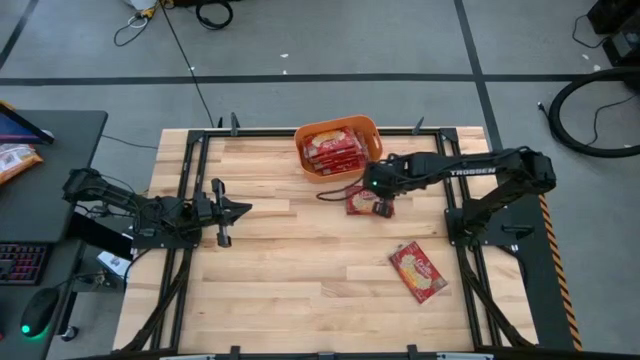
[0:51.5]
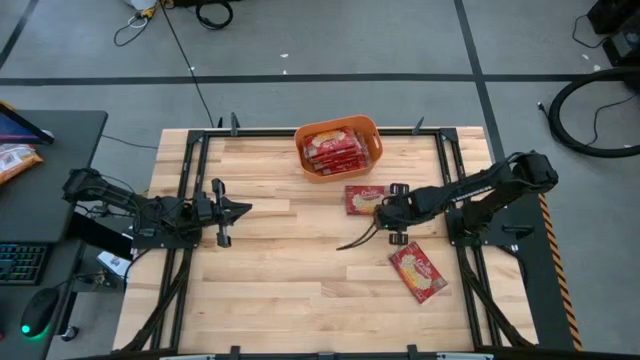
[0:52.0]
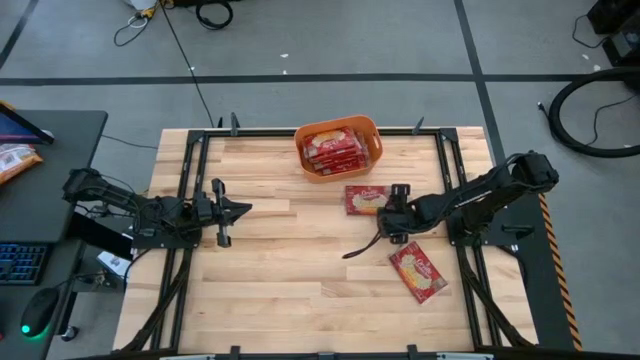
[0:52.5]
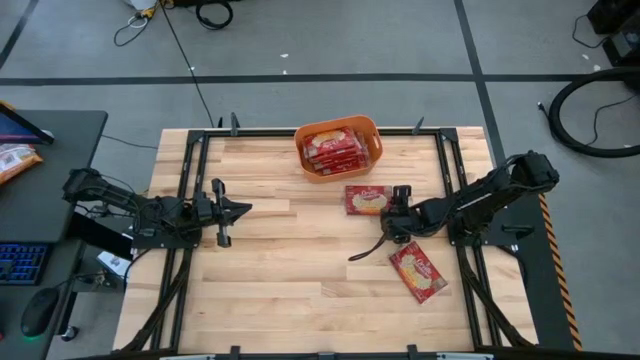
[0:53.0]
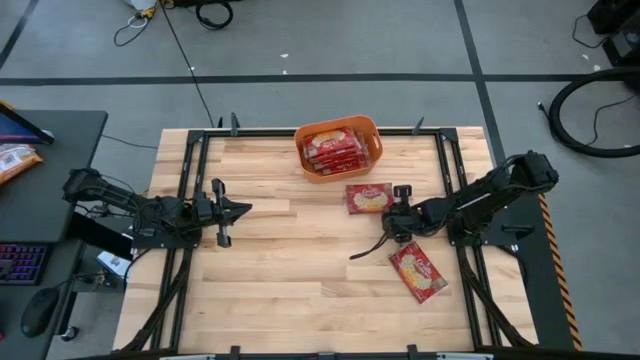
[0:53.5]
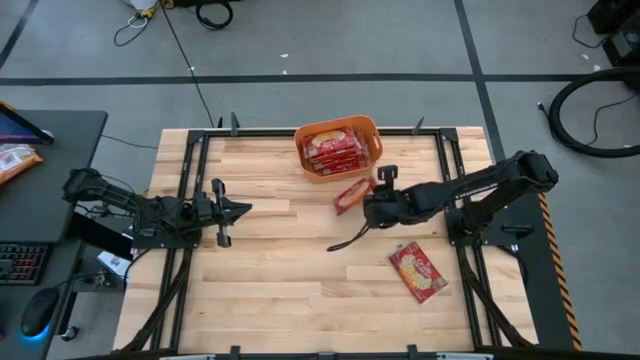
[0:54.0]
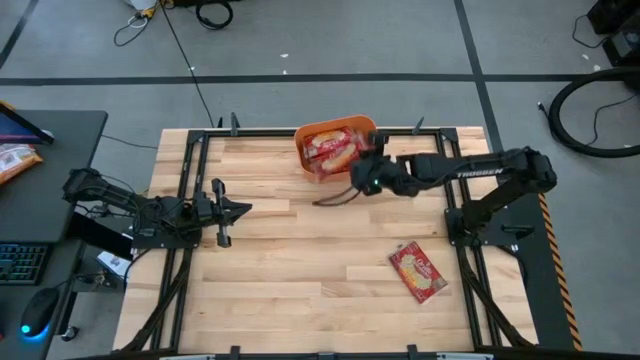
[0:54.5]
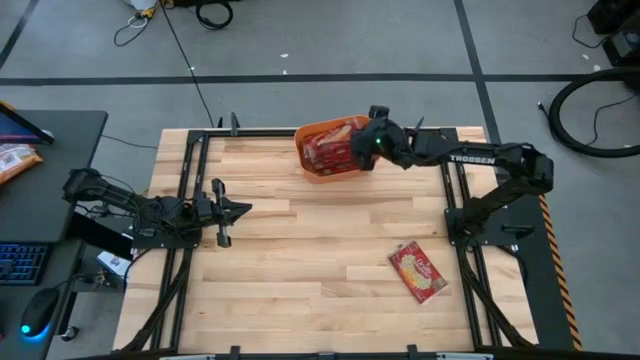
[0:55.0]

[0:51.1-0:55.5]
Task: Sort popcorn bags into baskets
Stack the popcorn bag on top of the stacked popcorn bag into the bin

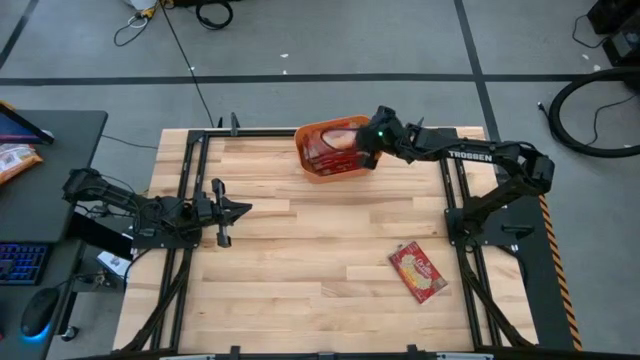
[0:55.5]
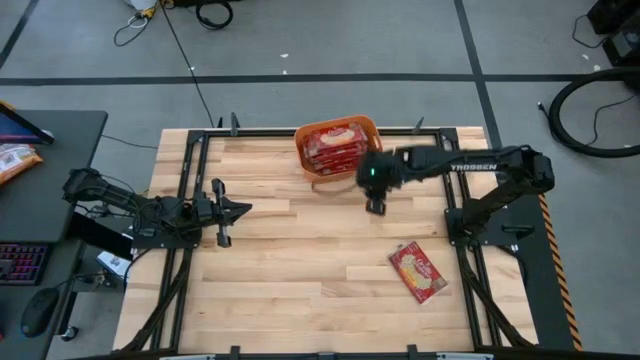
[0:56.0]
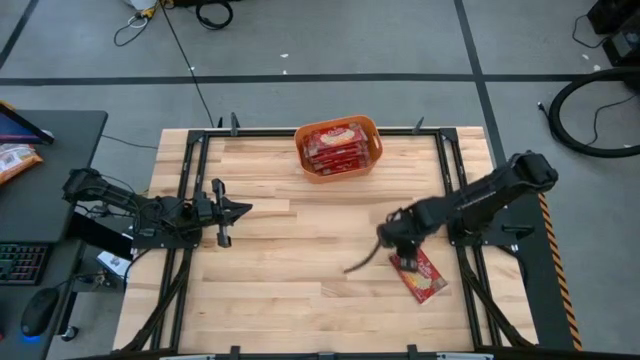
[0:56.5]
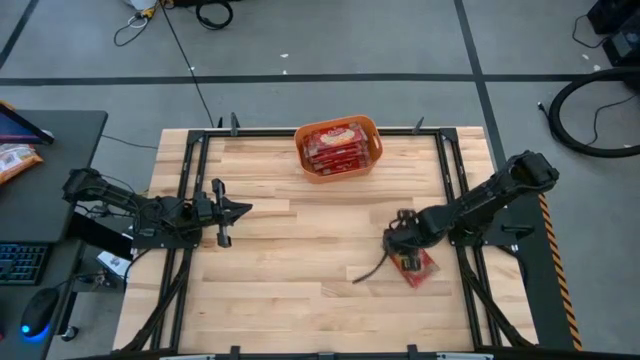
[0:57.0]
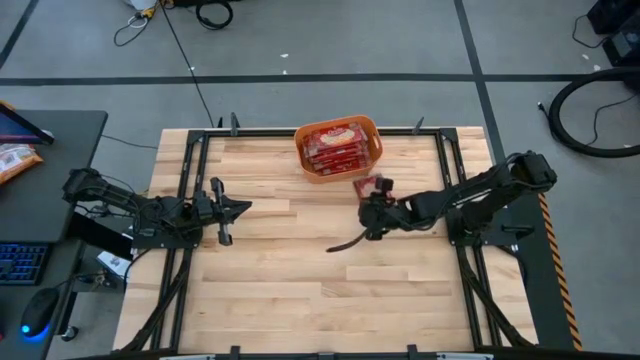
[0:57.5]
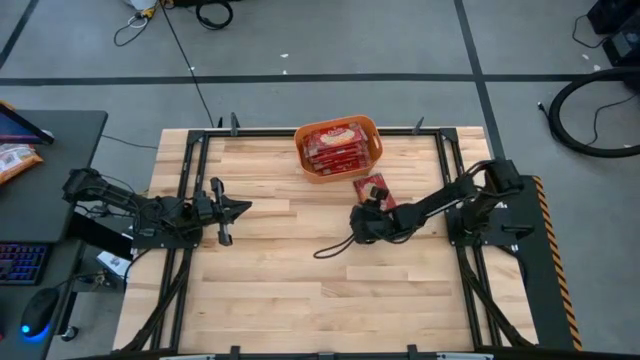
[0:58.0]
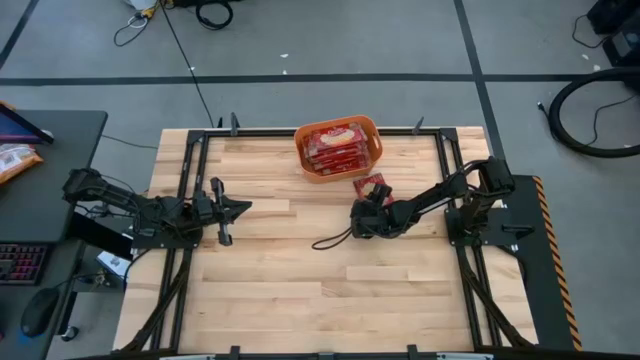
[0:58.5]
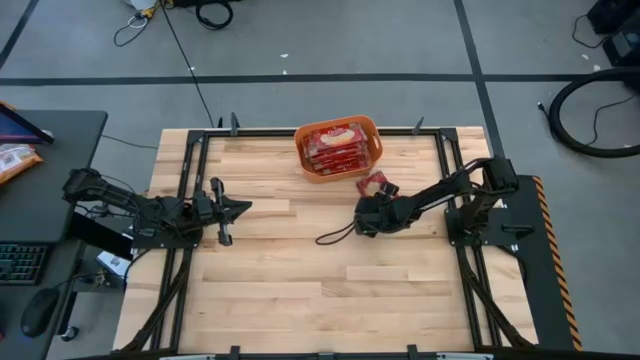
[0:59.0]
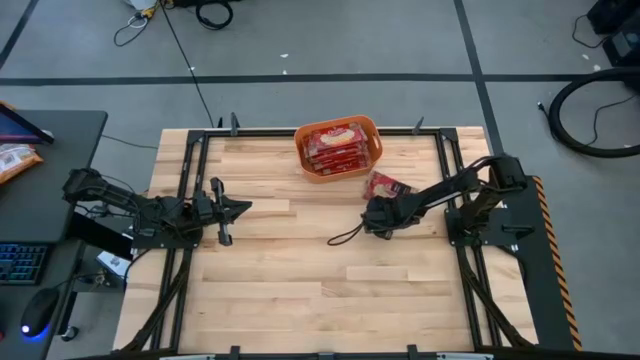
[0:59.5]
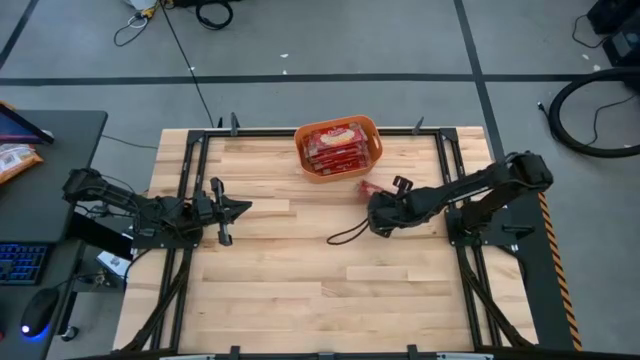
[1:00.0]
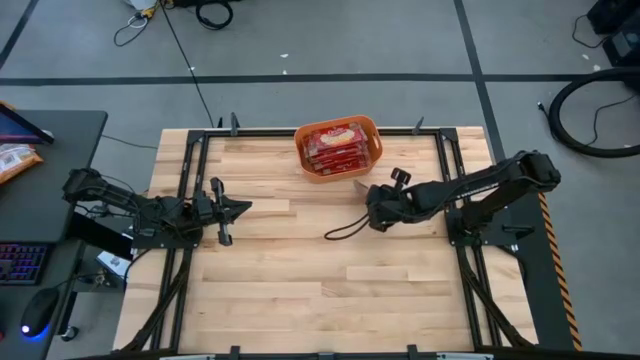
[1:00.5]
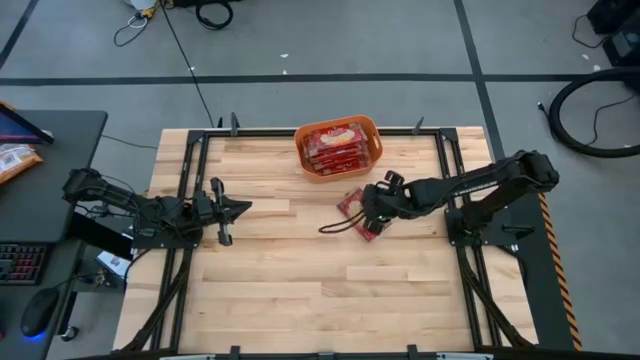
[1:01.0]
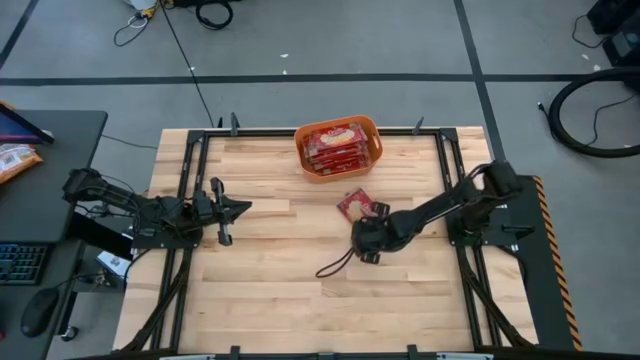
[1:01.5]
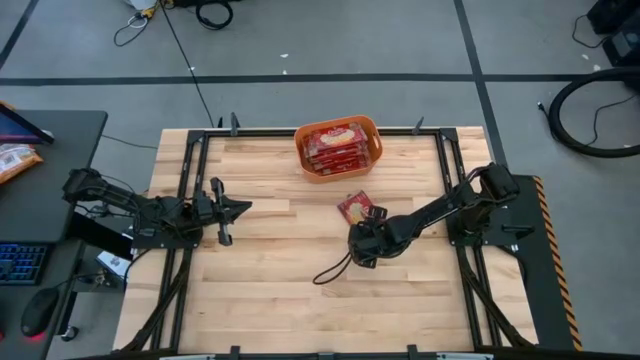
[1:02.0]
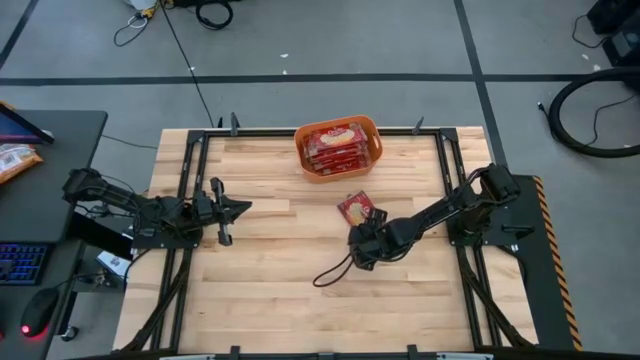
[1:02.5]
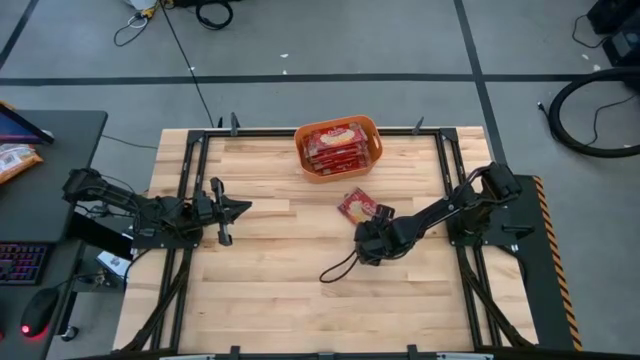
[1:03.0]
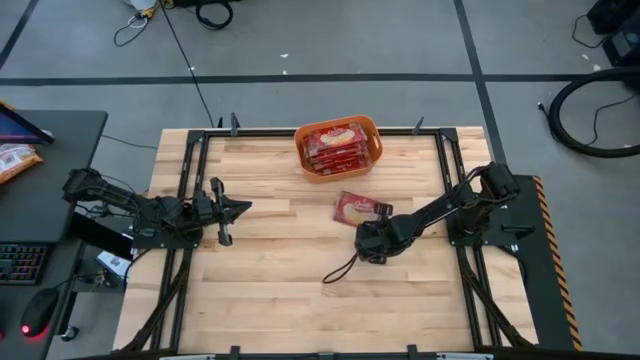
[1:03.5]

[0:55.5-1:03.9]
Stack the popcorn bag on top of the stacked popcorn bag into the bin

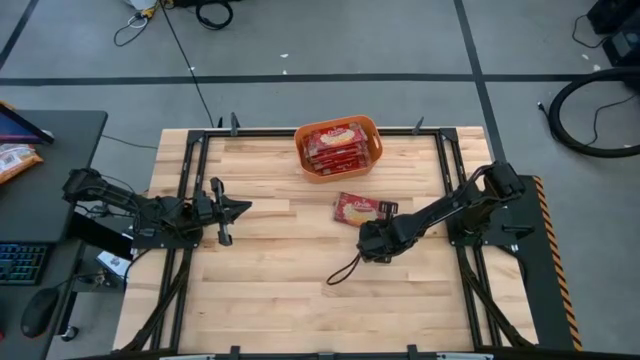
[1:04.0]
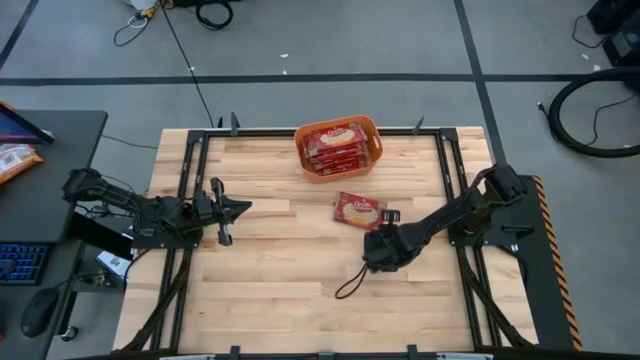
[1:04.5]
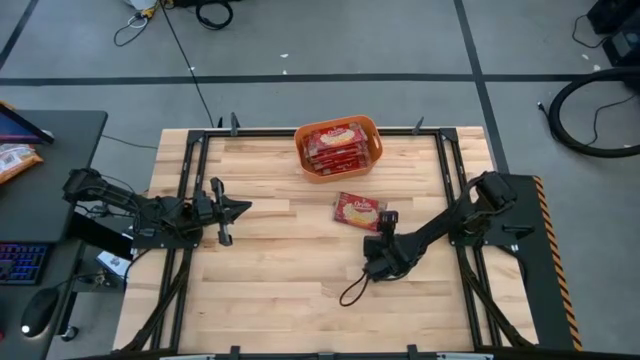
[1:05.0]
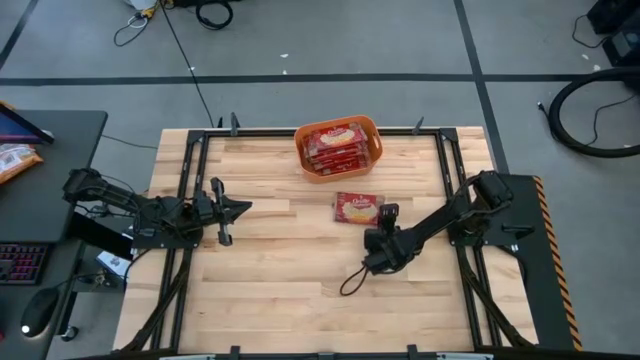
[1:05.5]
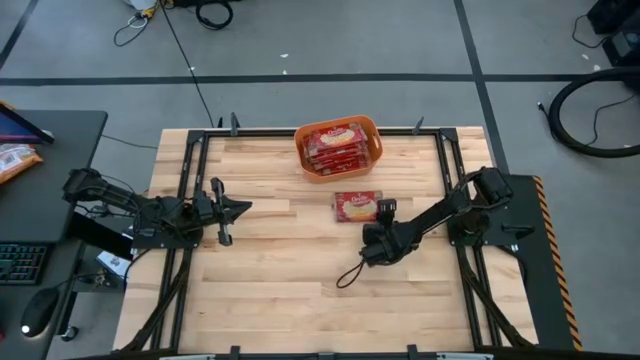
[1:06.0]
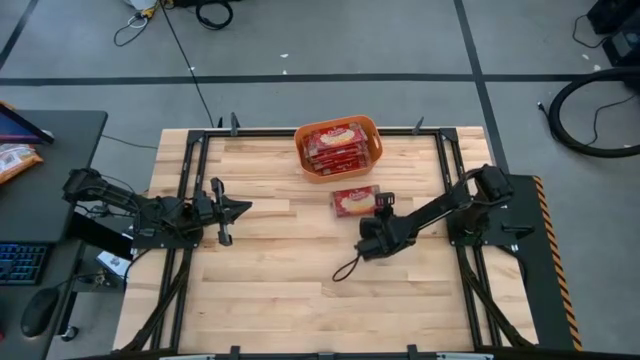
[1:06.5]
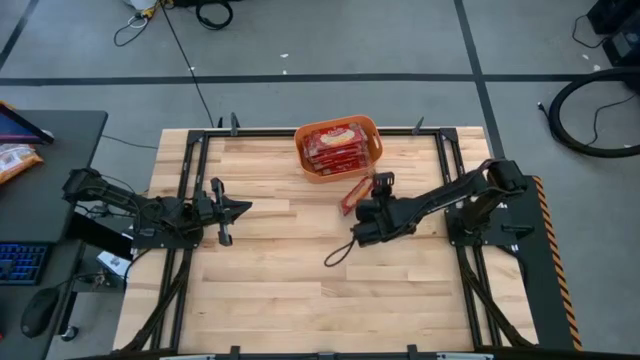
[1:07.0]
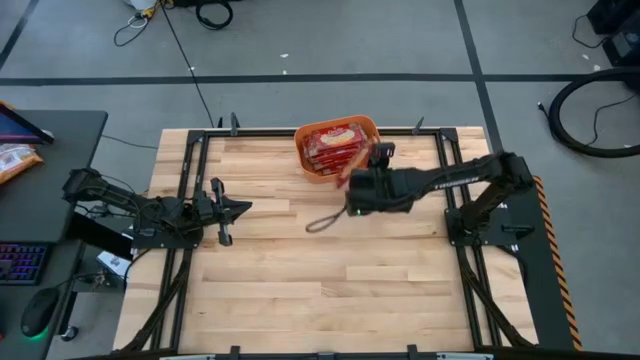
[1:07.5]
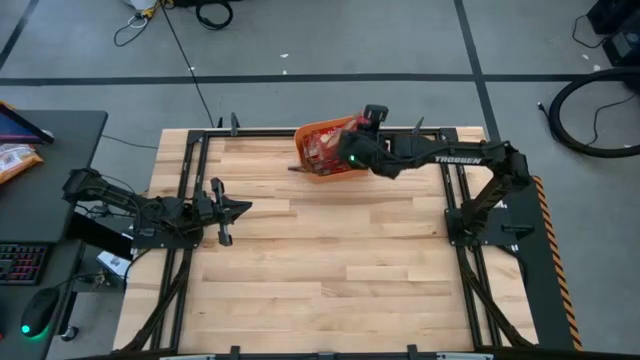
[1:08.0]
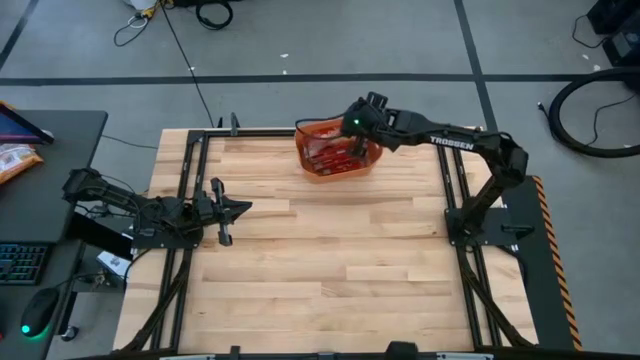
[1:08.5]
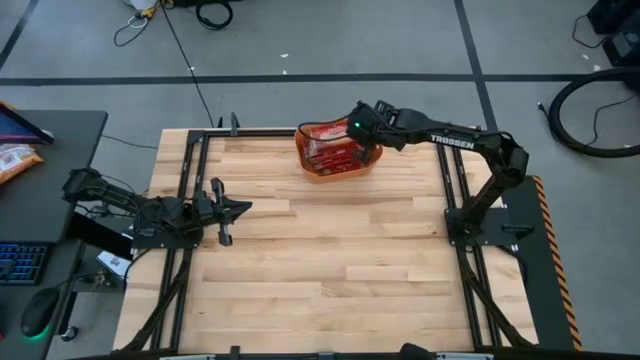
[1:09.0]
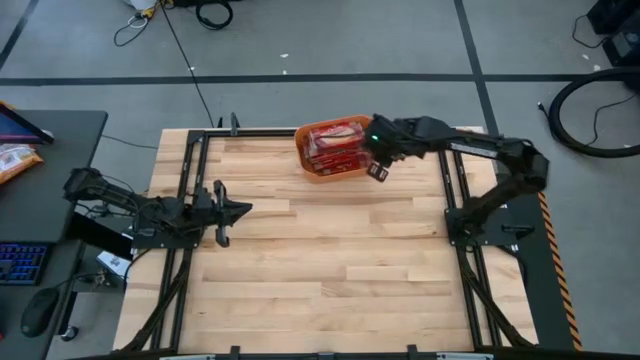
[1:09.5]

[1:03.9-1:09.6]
Stack the popcorn bag on top of the stacked popcorn bag into the bin

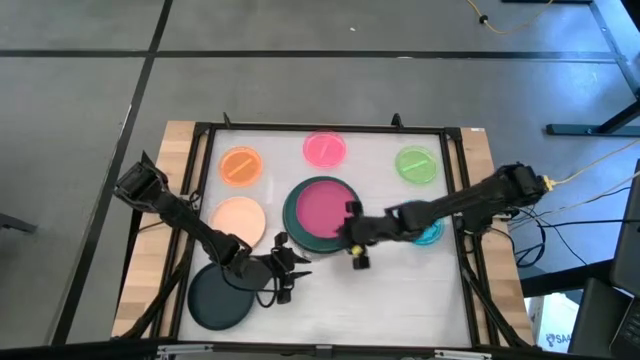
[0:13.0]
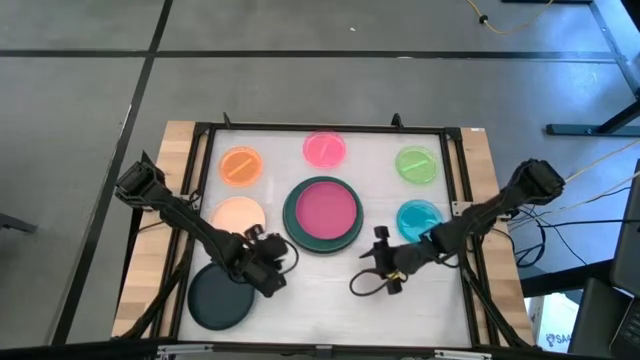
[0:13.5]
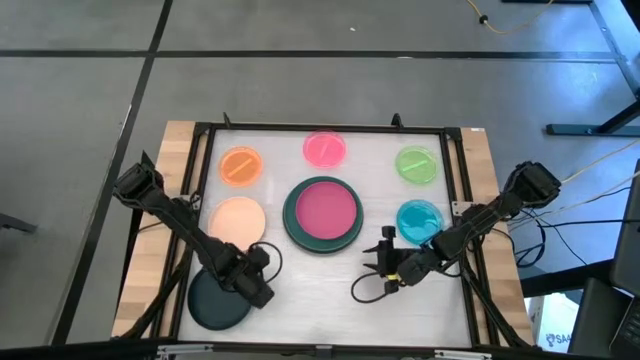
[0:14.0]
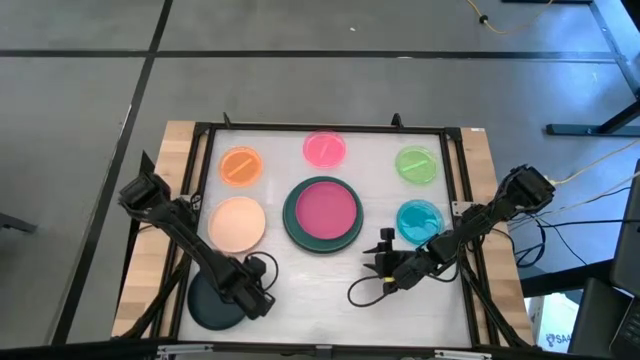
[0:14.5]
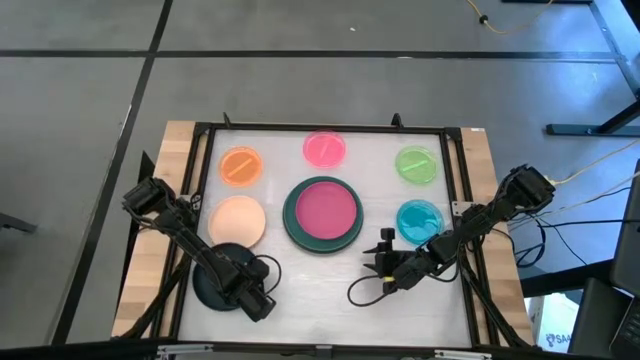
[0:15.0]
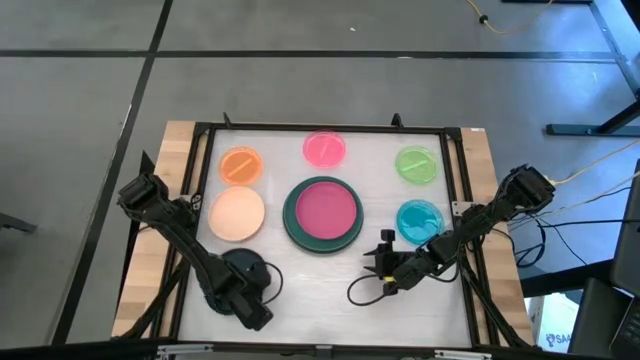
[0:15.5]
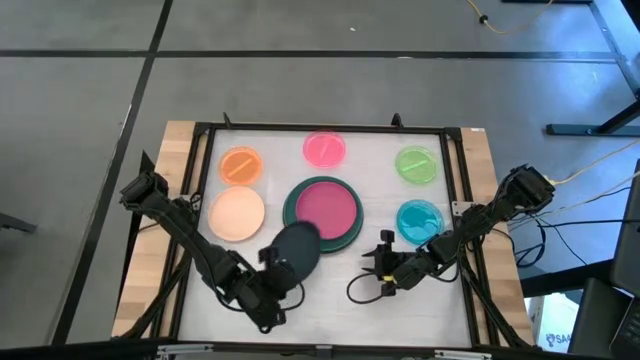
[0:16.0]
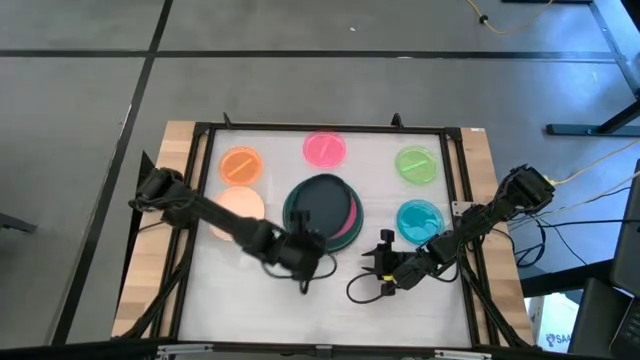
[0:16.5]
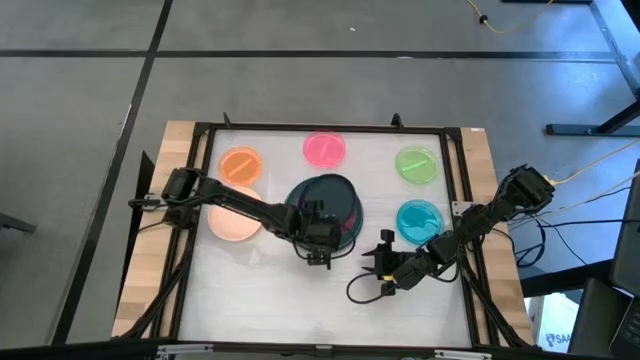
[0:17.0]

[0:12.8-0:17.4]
Task: Stack plastic plates
Stack the medium black plate on top of the medium pink plate
